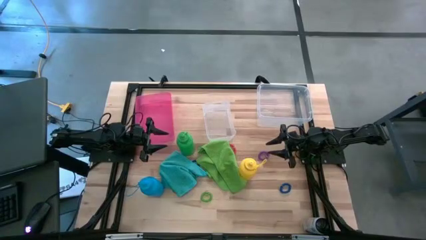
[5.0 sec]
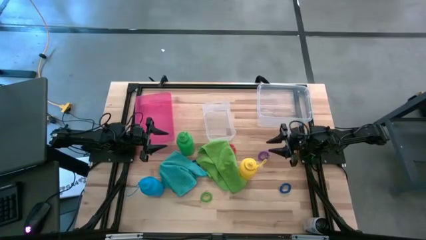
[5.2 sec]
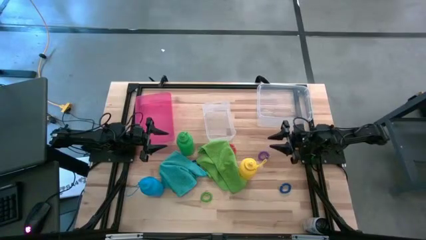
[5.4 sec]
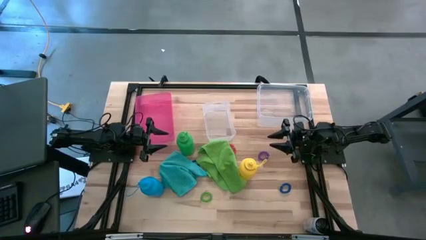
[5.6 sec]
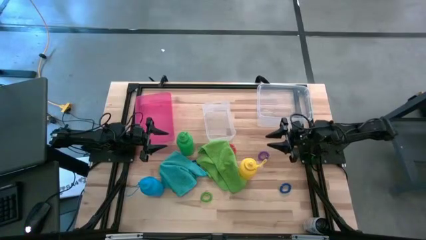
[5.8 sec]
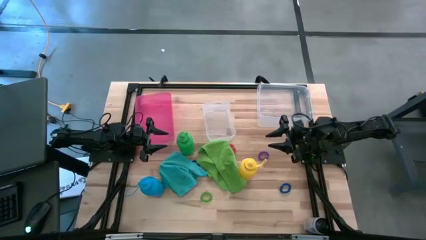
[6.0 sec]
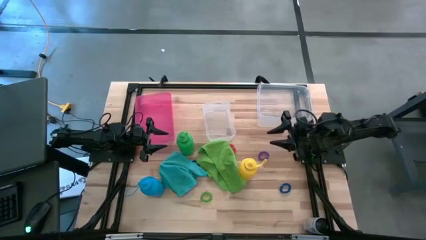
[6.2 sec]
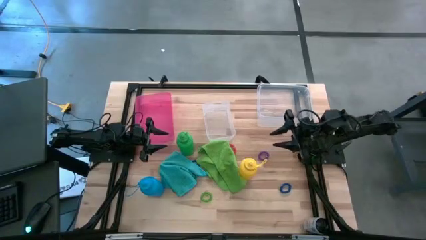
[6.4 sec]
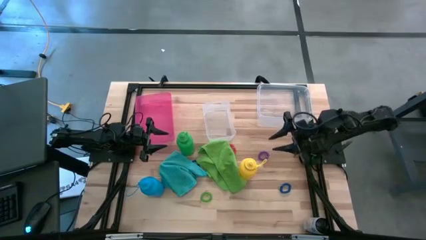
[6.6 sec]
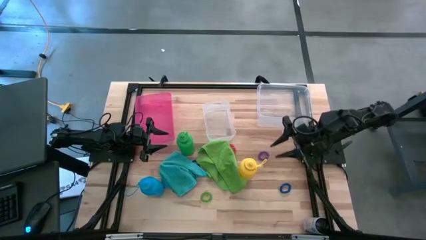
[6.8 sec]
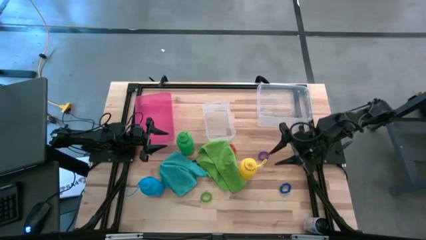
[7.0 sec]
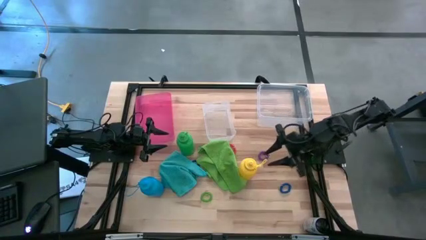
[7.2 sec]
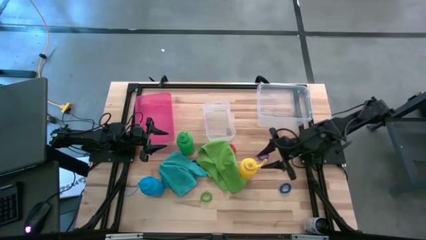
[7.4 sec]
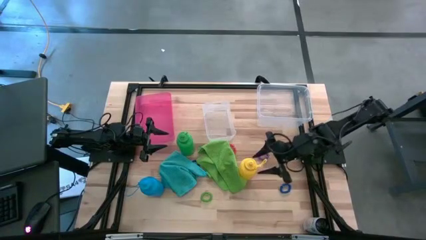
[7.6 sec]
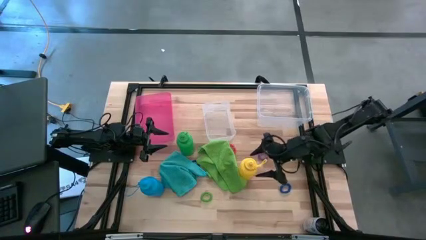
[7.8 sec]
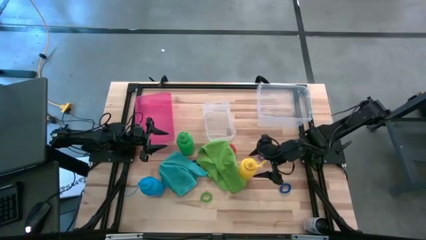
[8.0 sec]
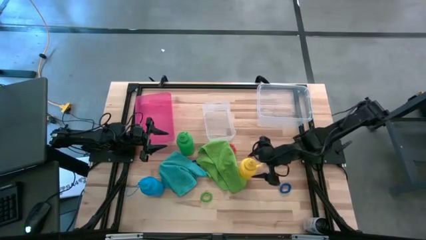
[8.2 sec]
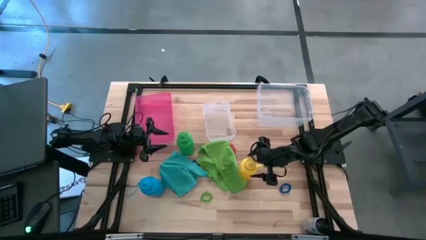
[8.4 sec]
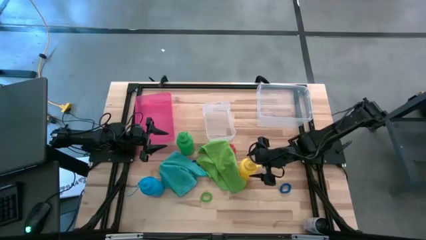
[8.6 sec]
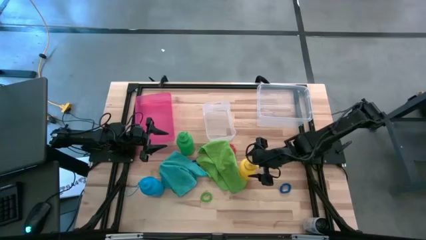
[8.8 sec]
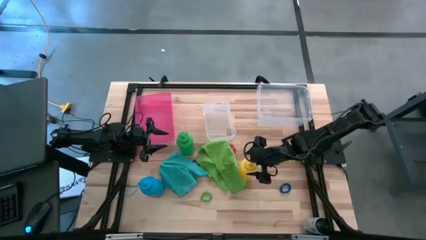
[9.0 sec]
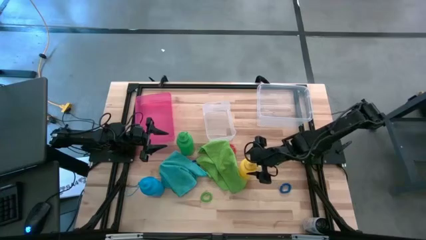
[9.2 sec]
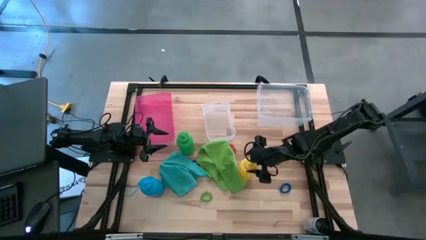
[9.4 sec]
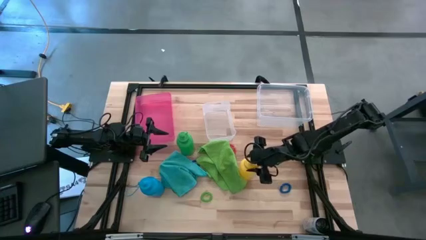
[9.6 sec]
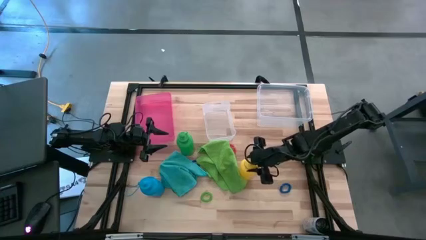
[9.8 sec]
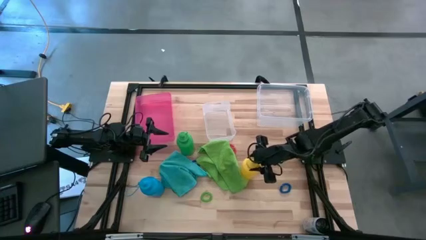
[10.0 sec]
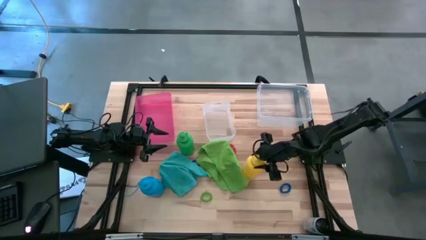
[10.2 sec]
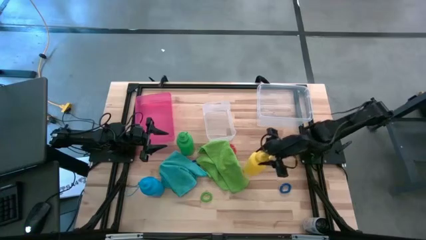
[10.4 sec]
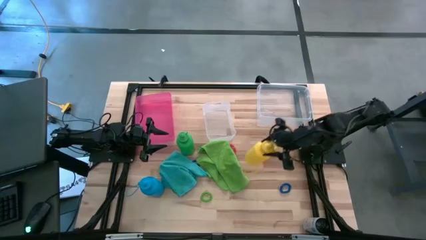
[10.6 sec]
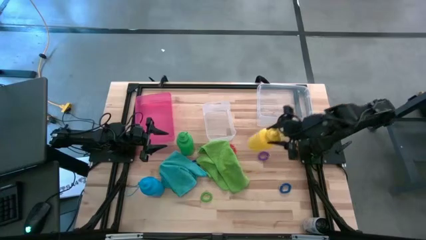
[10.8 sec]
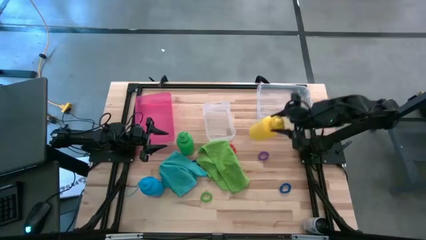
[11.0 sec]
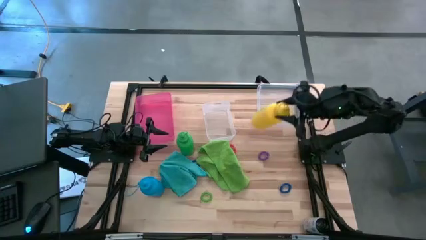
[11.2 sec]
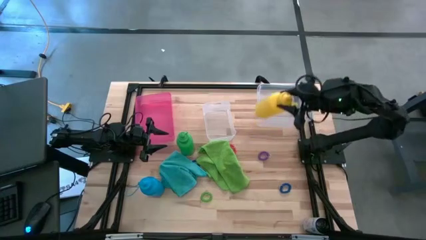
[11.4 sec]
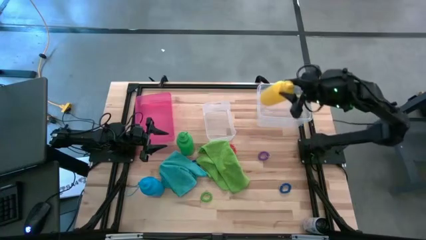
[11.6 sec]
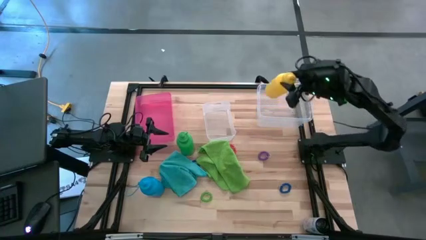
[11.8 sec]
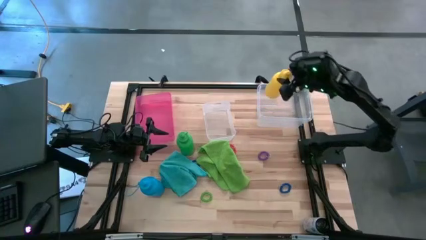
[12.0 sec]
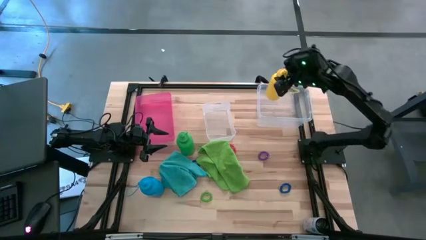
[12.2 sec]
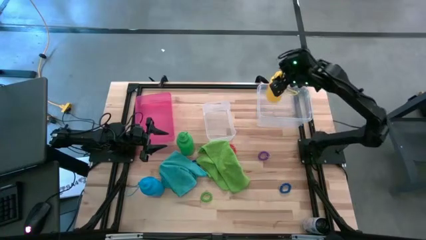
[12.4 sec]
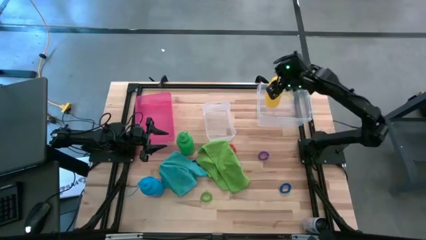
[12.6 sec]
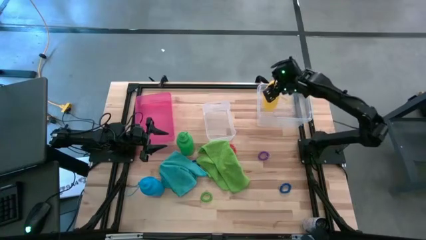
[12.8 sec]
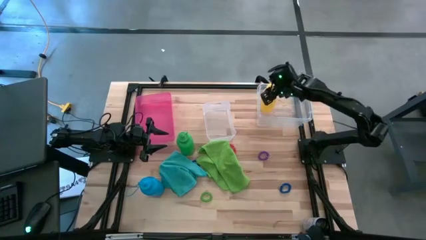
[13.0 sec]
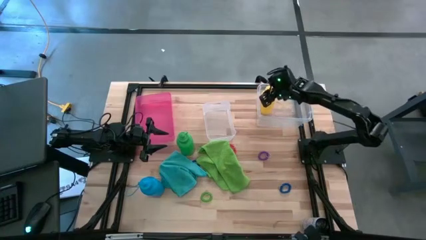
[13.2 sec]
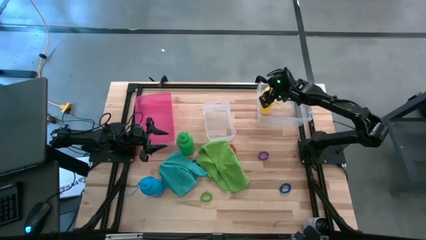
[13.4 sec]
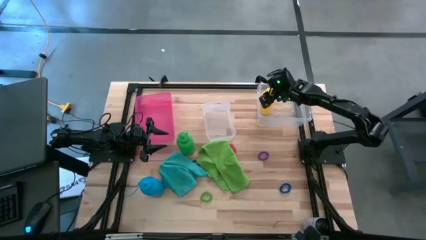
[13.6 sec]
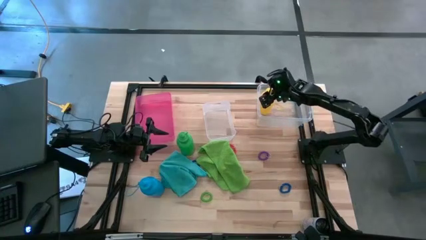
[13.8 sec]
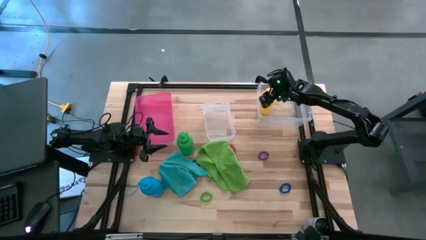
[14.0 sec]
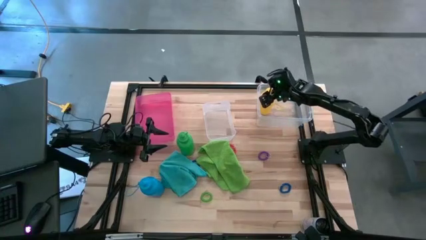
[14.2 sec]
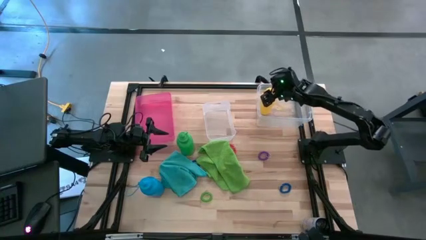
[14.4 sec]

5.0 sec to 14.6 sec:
Task: Pick & Place Sports Items
Put the yellow water bottle into the right transparent bin

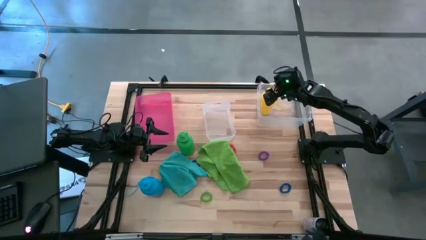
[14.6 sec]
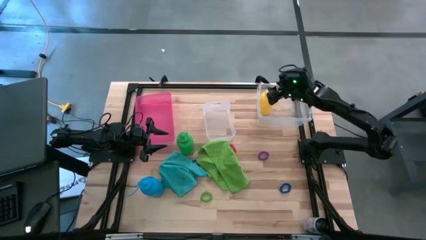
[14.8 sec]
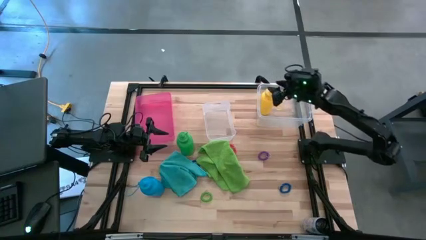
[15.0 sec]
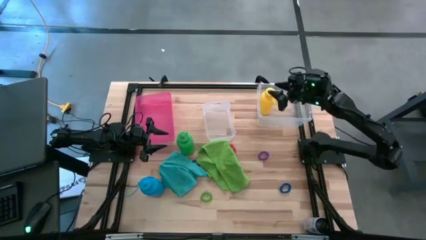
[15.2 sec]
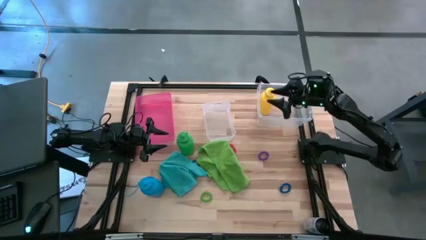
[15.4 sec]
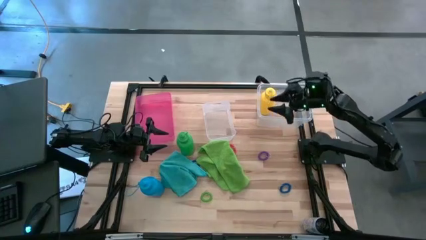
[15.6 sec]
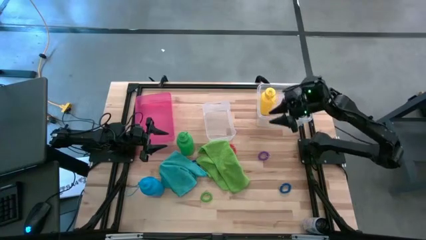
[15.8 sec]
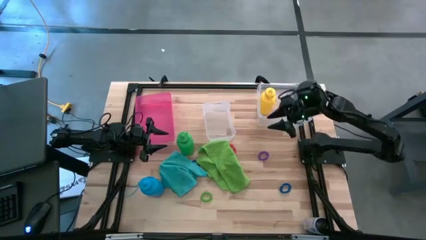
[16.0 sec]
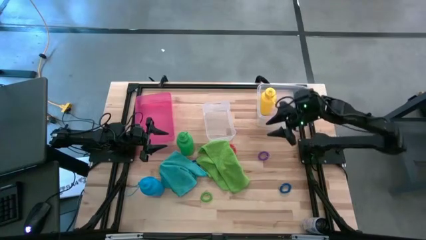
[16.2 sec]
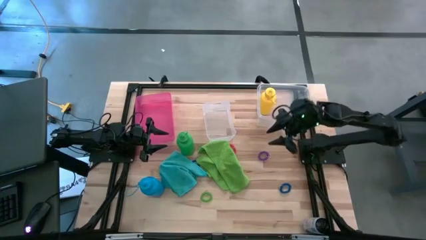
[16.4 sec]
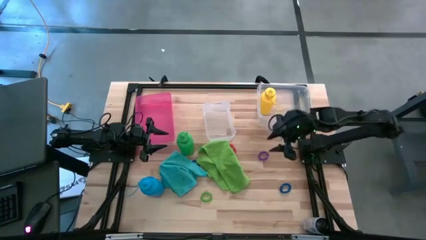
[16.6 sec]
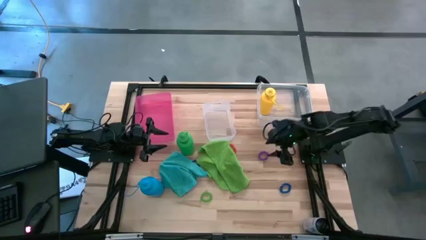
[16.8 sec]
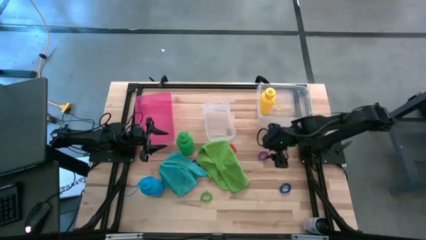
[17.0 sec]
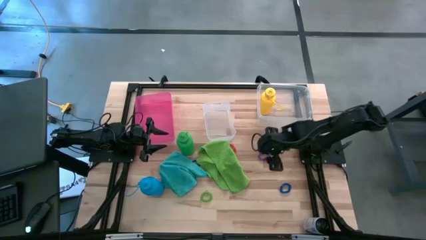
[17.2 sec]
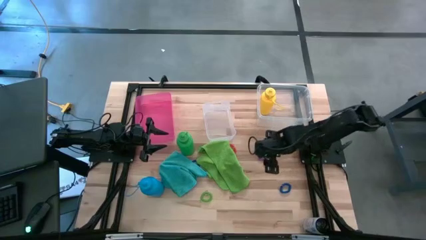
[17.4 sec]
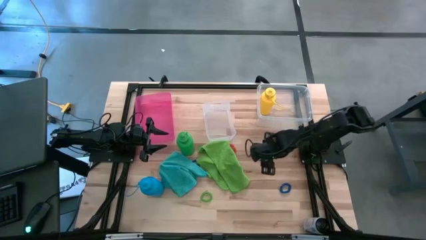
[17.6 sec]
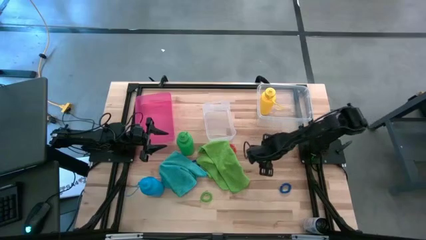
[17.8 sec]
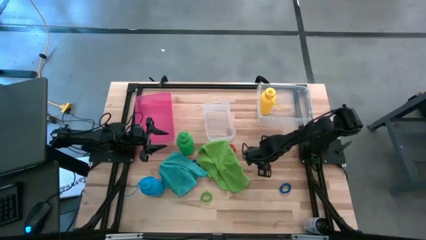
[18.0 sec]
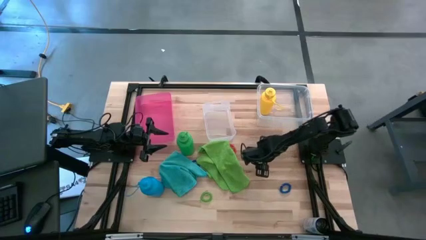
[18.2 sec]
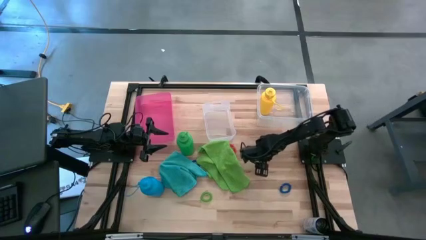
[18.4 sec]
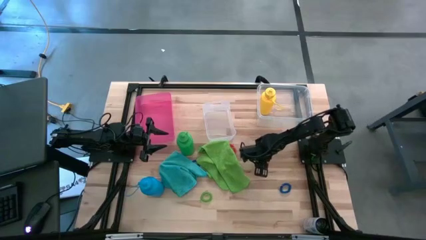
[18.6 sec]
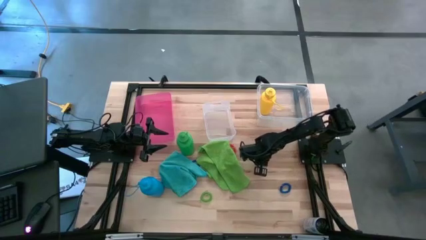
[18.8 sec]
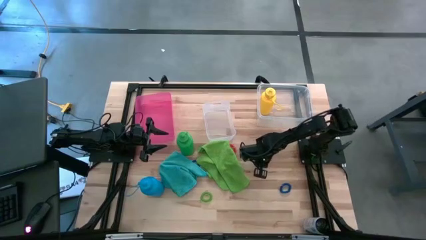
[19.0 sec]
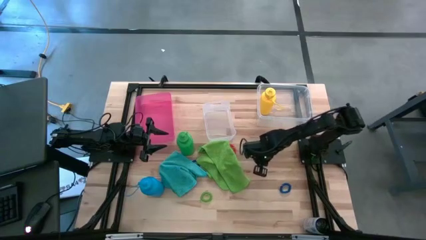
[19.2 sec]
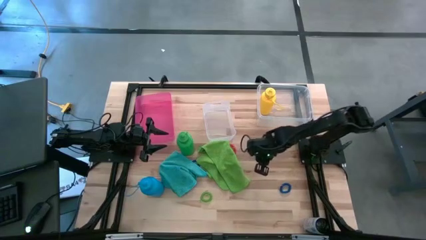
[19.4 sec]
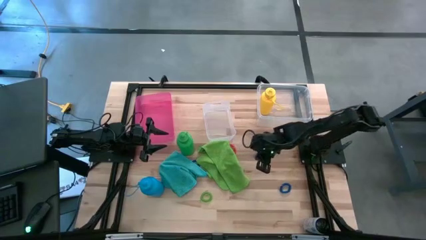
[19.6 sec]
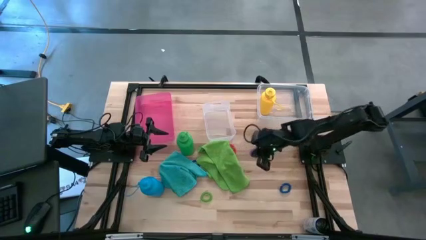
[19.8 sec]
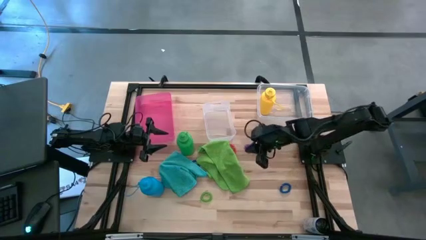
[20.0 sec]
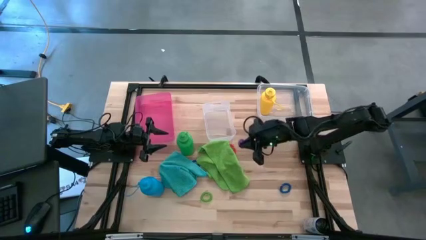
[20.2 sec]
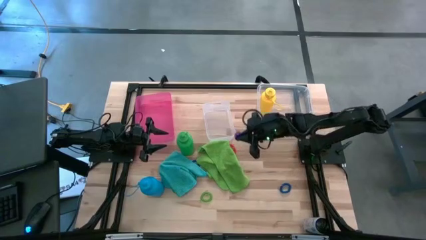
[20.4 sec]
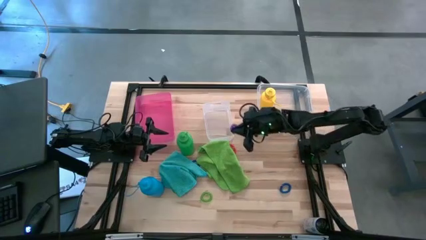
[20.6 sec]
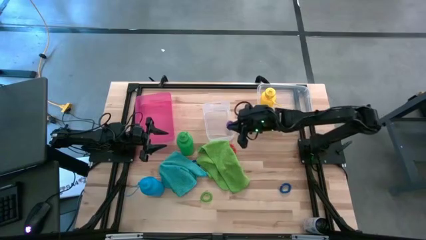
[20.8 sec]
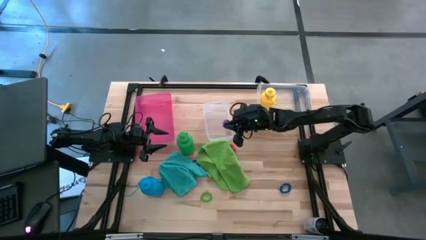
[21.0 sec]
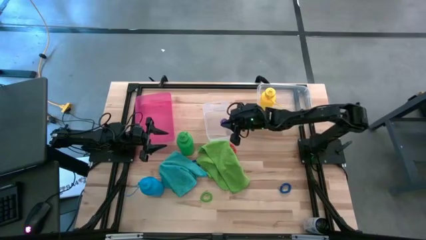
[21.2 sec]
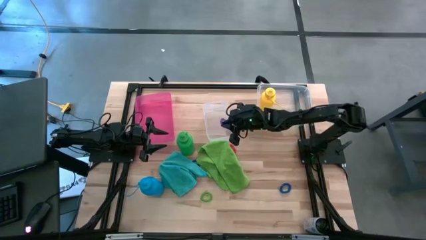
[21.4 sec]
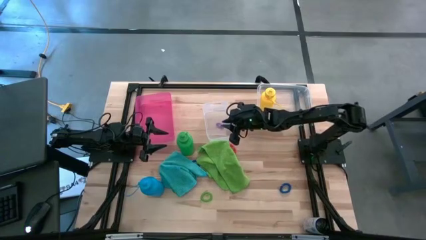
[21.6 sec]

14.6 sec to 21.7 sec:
Put the right purple spring keychain into the left transparent bin
